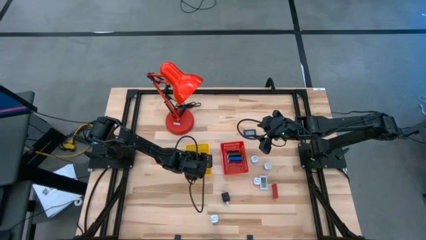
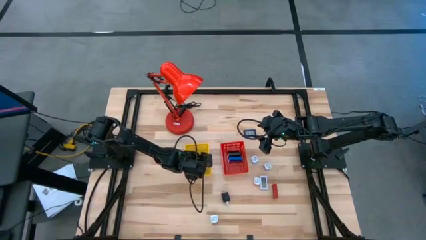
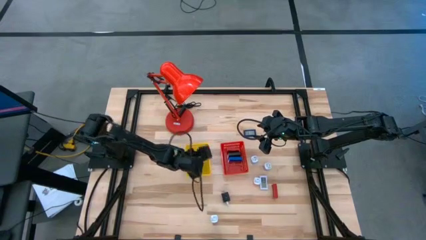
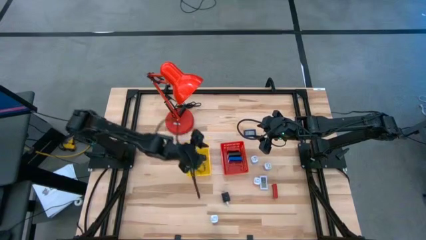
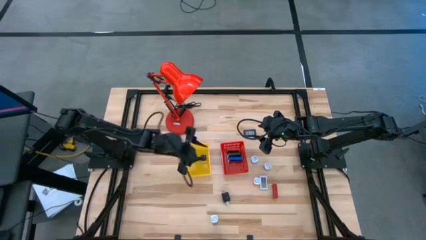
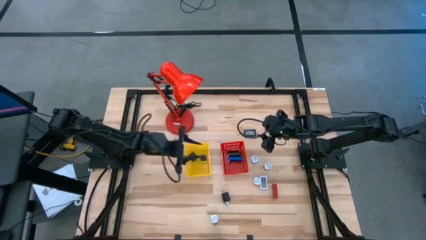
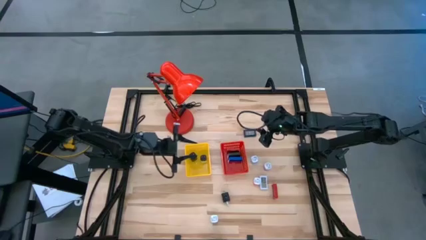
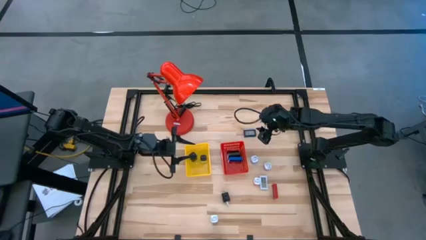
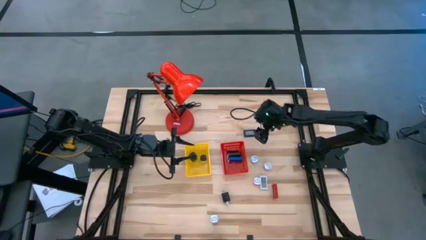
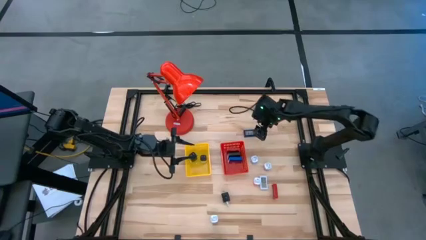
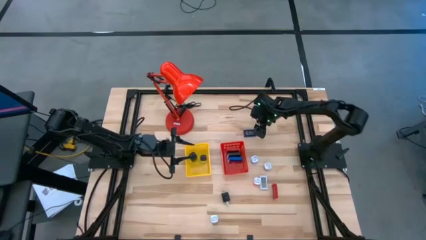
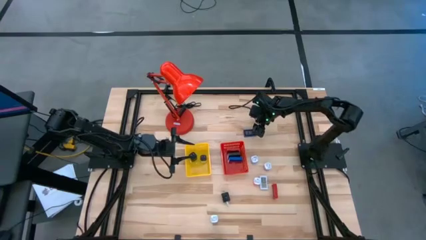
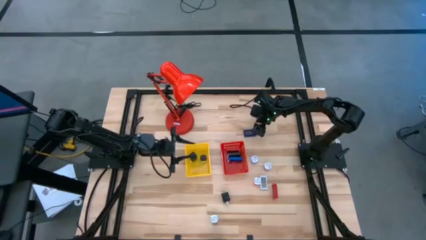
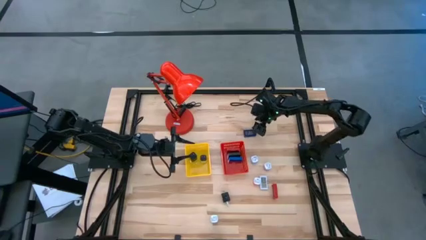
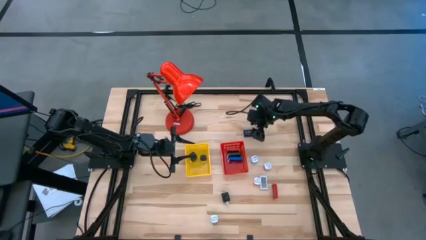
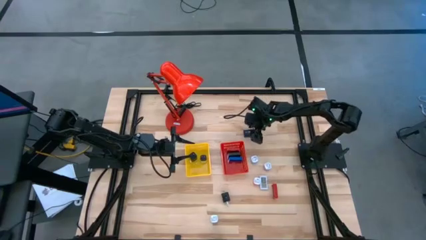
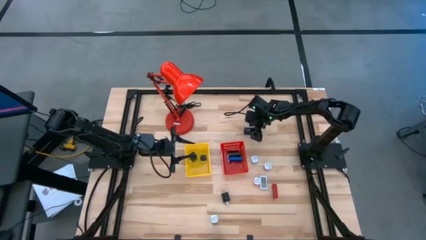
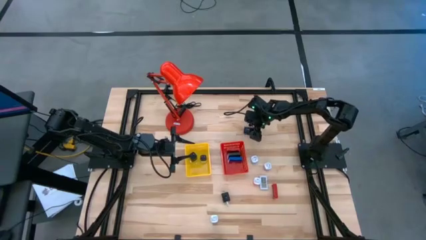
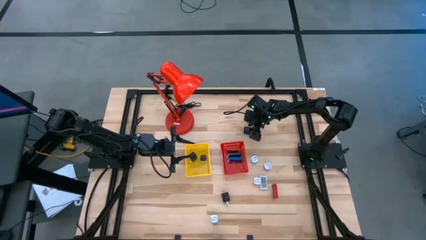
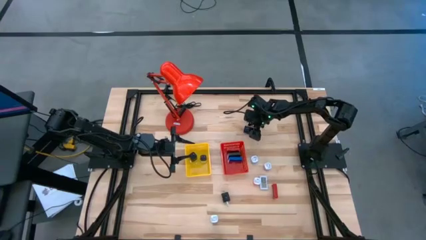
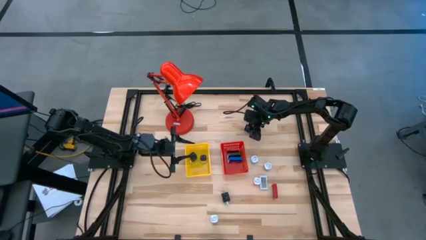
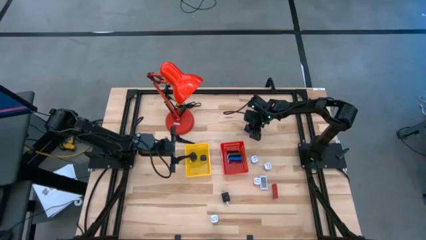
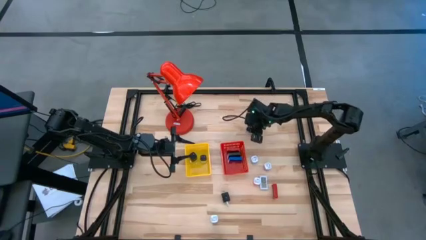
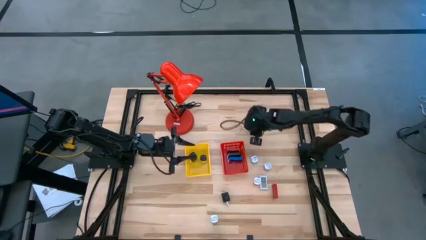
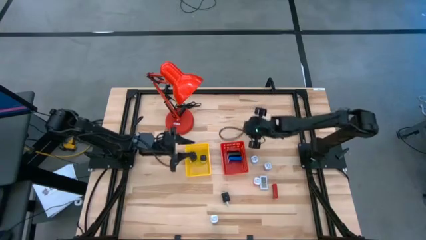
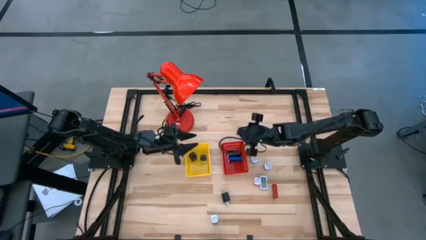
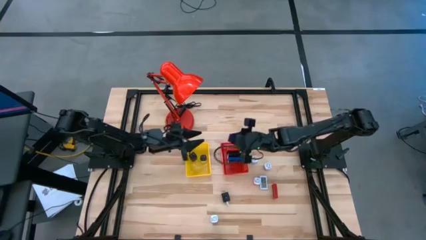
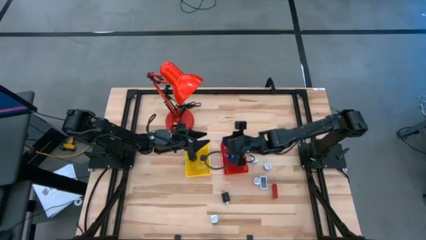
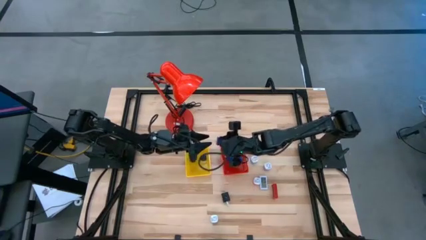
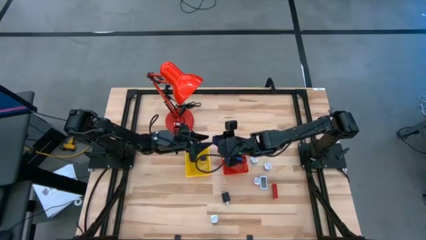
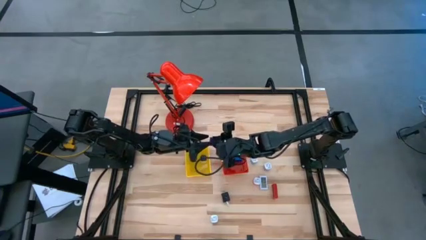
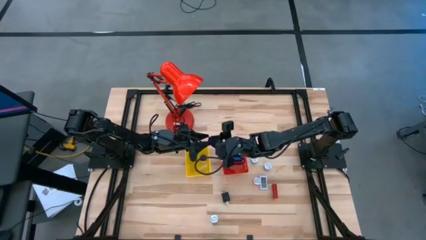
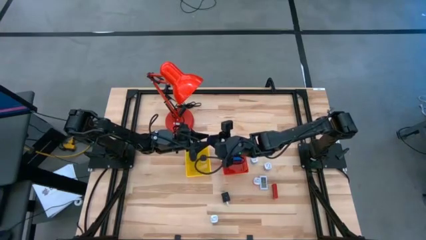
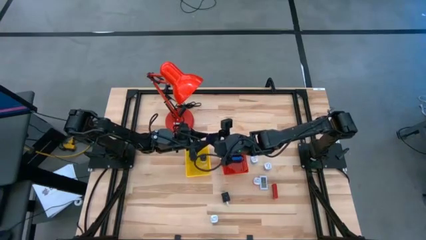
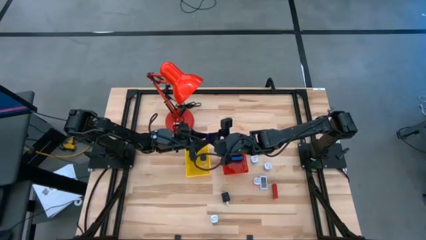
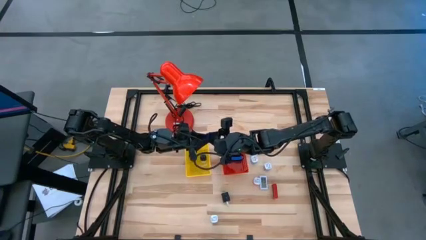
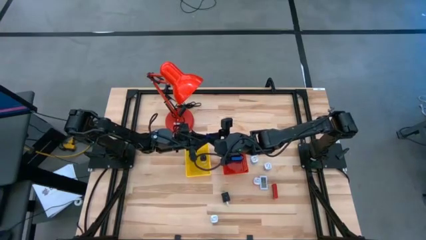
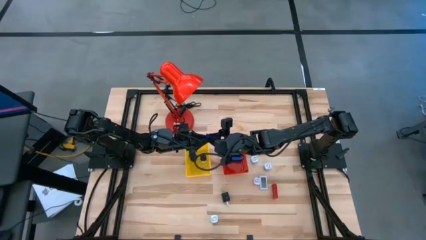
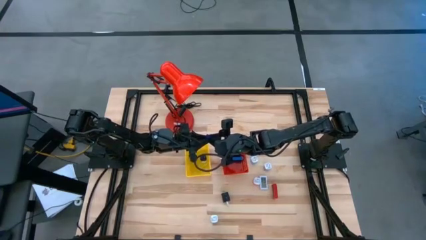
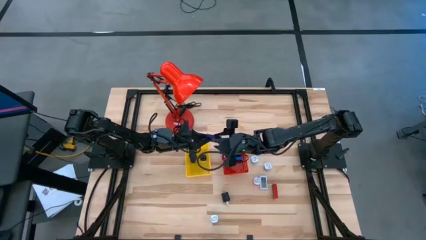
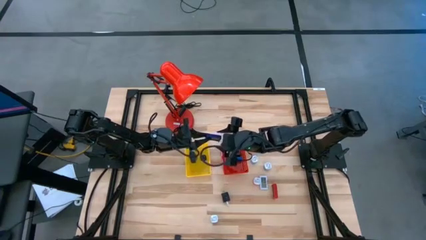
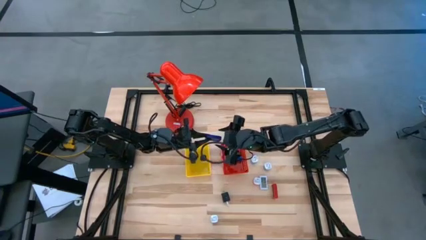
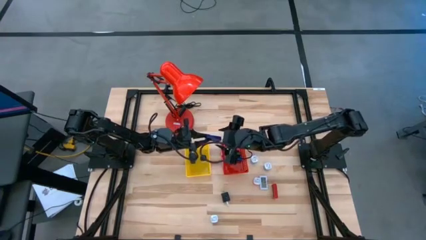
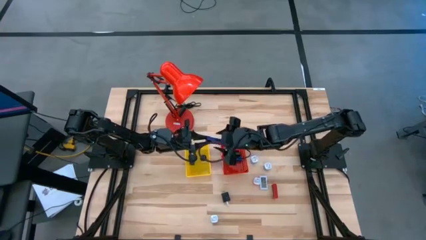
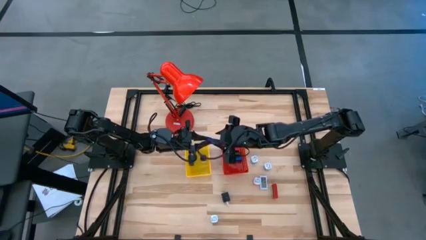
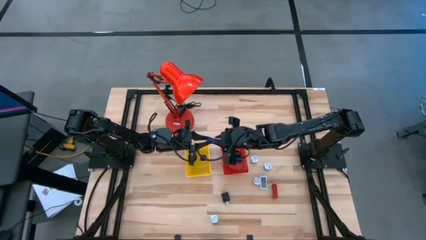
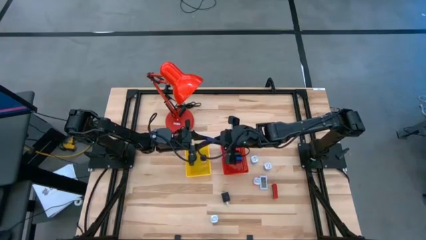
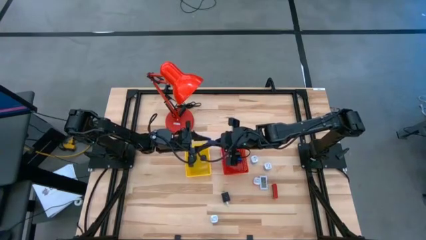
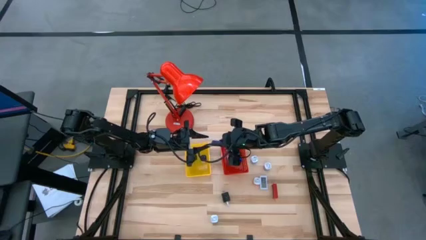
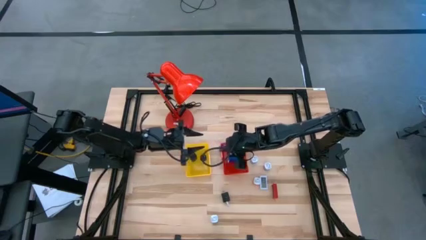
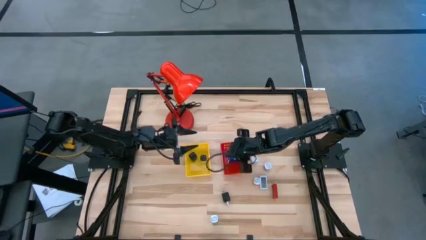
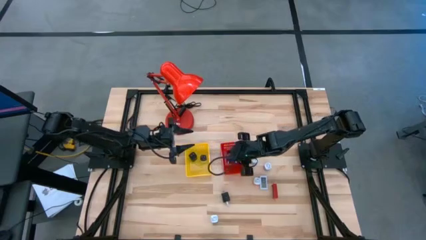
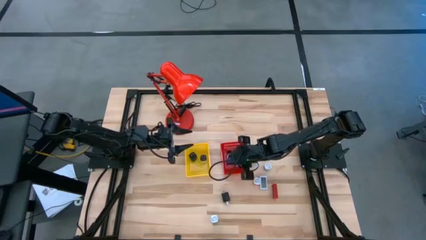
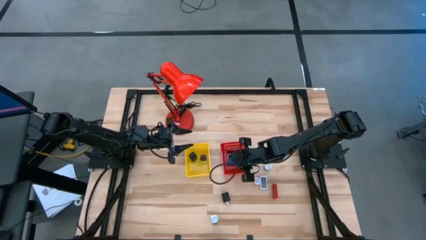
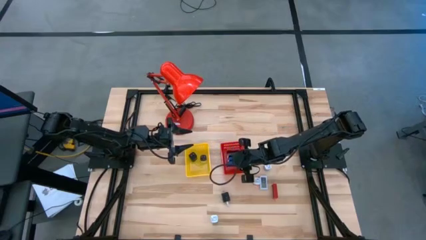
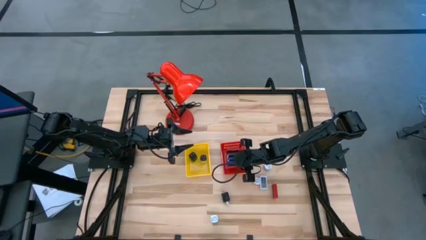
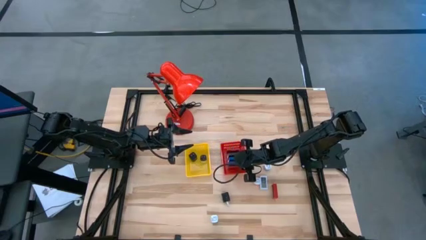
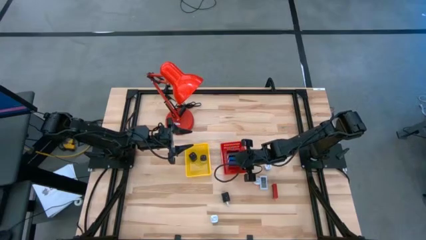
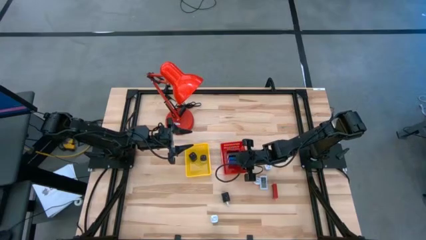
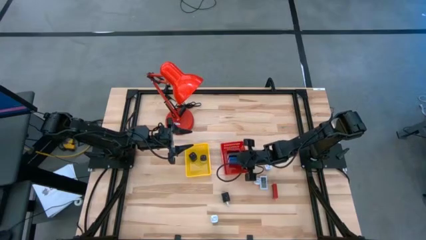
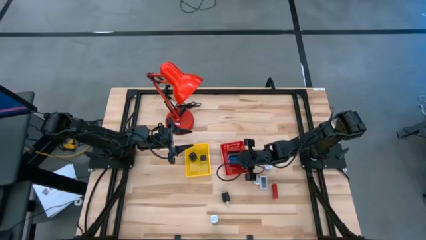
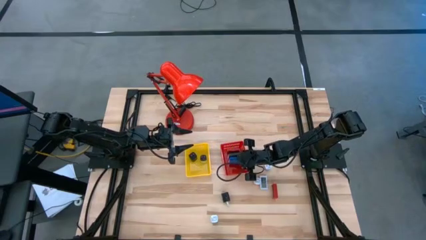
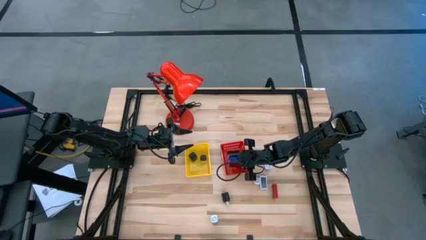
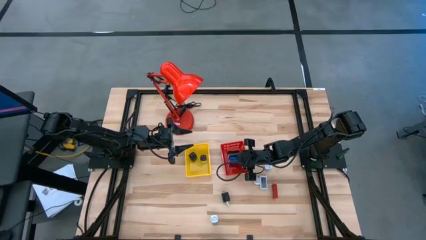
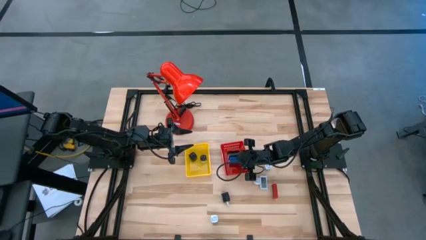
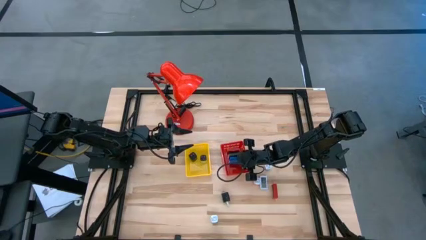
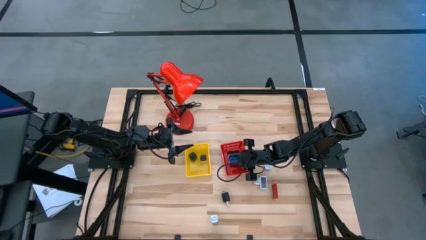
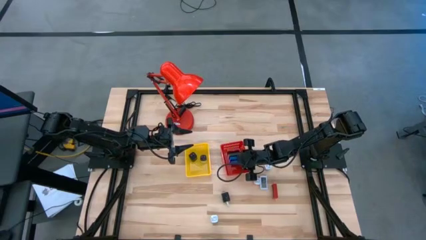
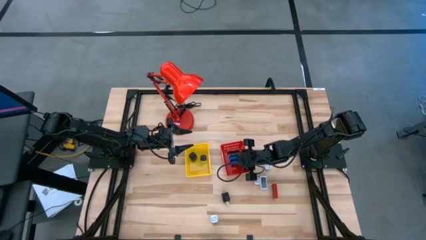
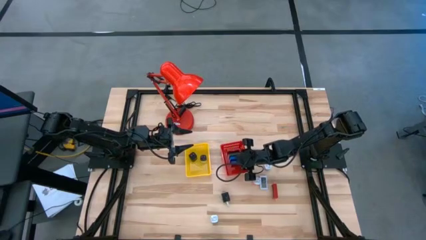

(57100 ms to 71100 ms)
Task: Pick & Place Office items
Put the dark blue digital timer into the red bin
